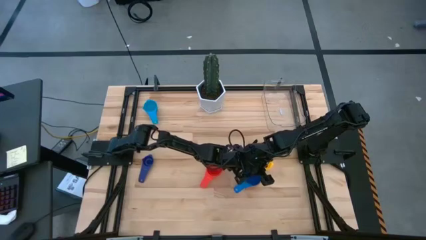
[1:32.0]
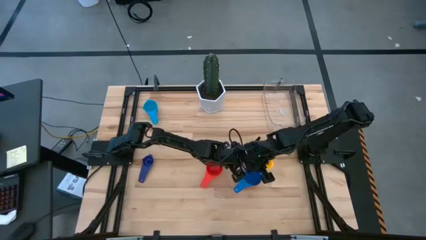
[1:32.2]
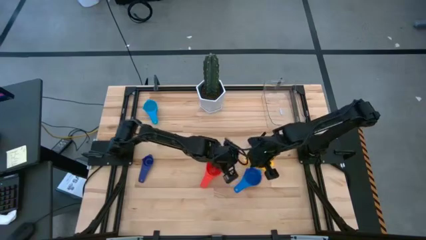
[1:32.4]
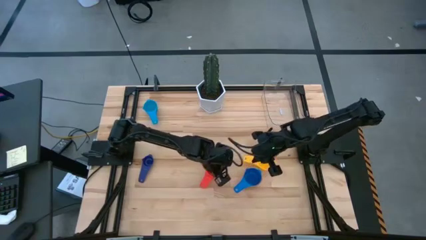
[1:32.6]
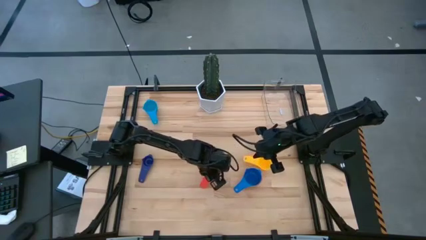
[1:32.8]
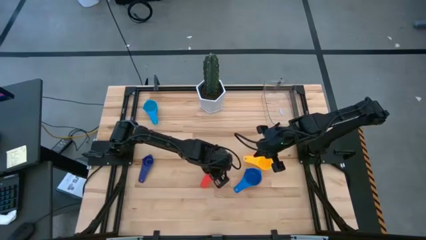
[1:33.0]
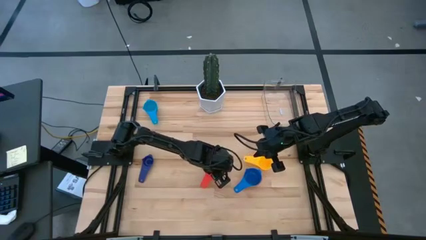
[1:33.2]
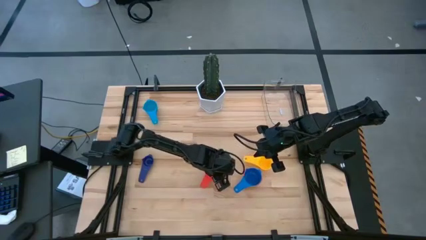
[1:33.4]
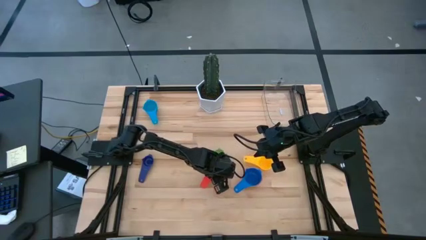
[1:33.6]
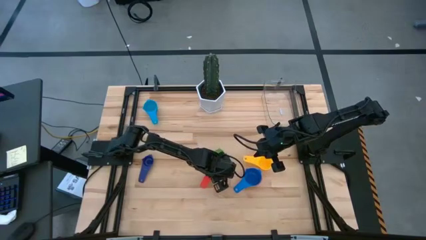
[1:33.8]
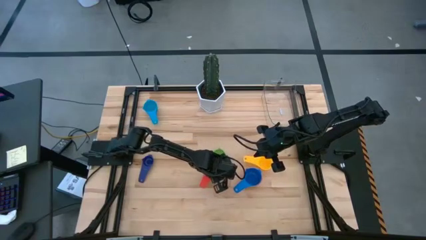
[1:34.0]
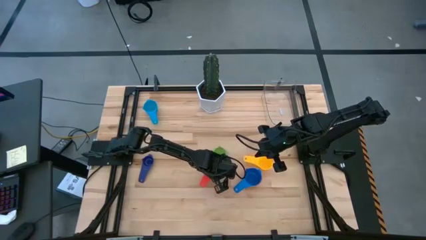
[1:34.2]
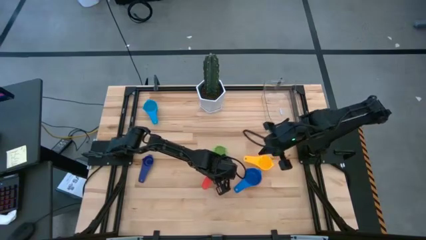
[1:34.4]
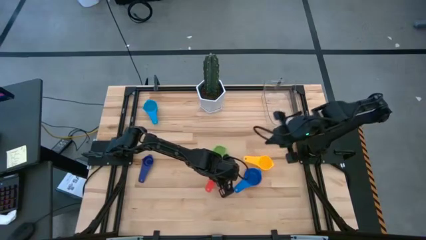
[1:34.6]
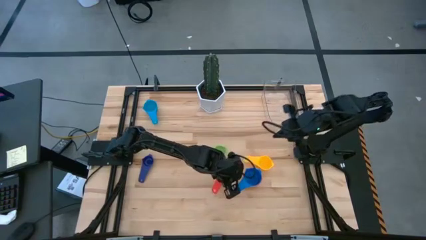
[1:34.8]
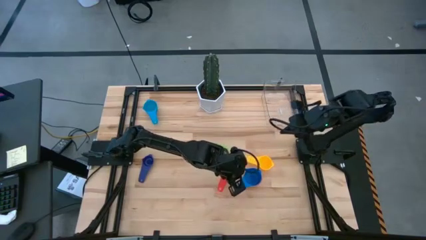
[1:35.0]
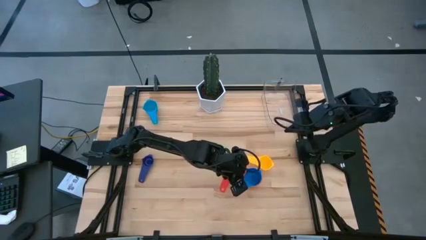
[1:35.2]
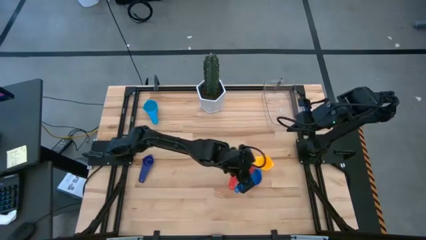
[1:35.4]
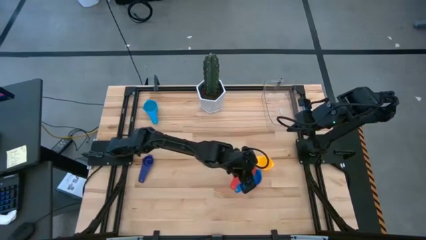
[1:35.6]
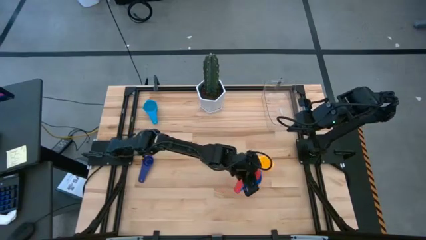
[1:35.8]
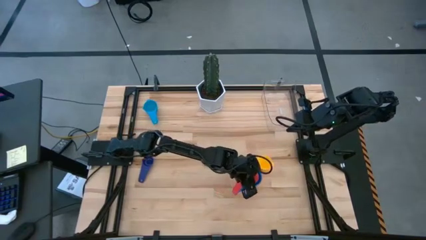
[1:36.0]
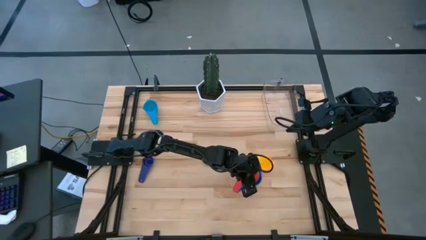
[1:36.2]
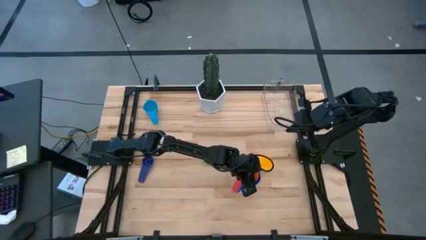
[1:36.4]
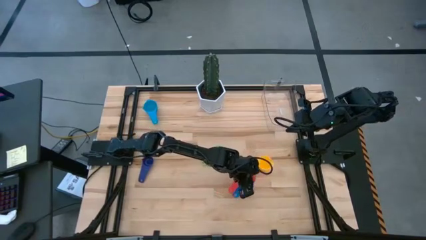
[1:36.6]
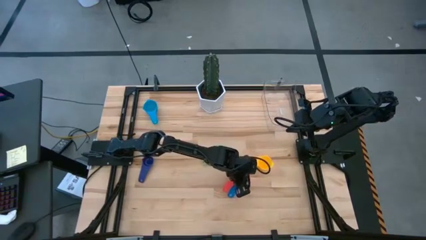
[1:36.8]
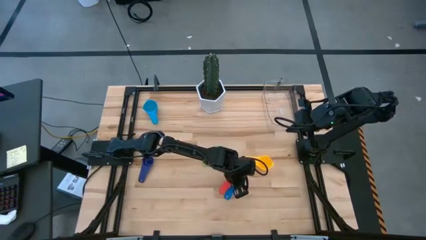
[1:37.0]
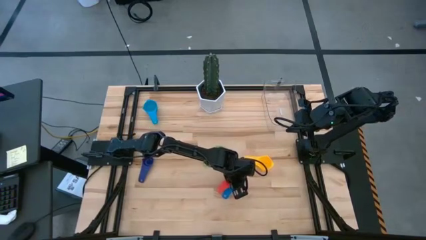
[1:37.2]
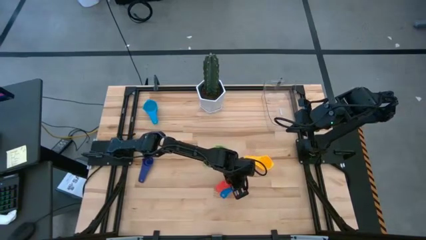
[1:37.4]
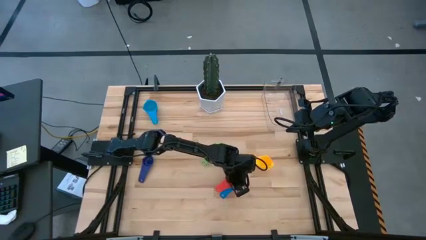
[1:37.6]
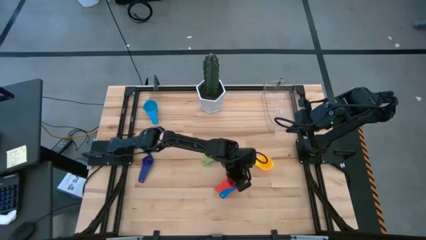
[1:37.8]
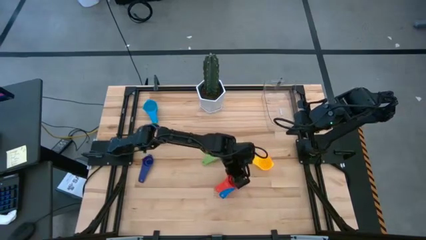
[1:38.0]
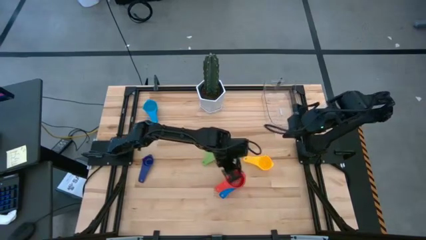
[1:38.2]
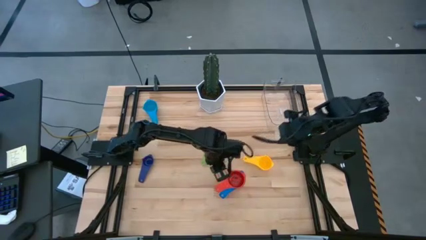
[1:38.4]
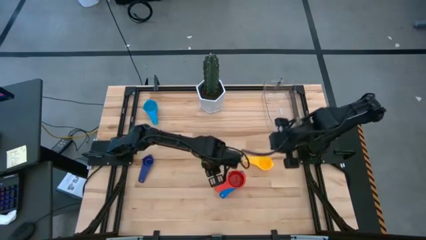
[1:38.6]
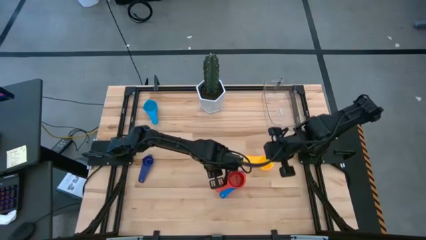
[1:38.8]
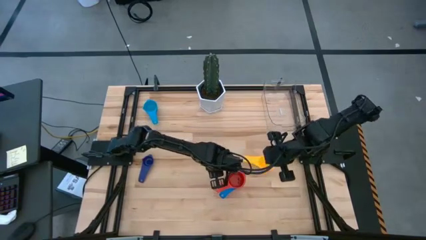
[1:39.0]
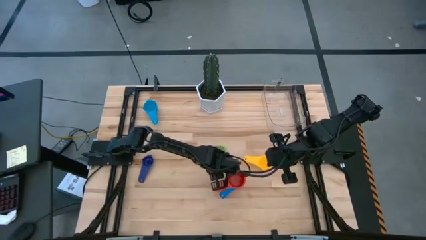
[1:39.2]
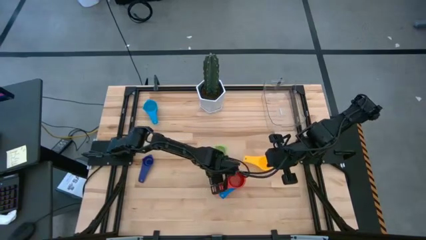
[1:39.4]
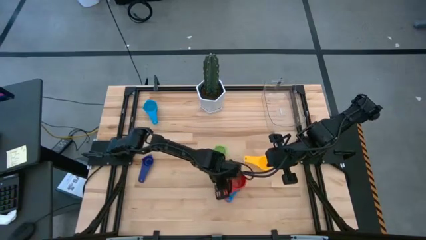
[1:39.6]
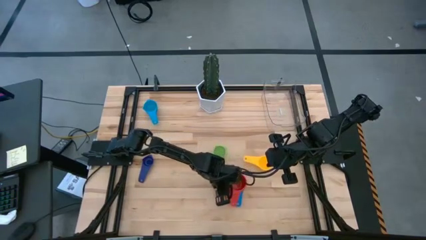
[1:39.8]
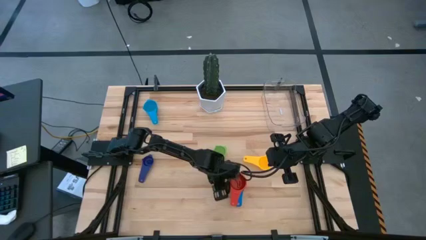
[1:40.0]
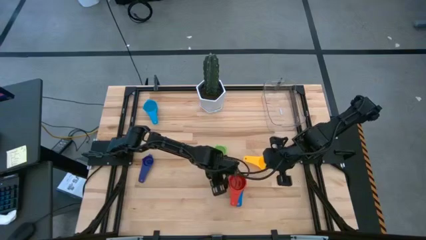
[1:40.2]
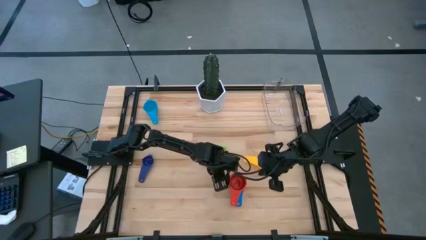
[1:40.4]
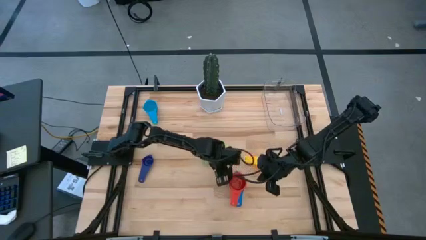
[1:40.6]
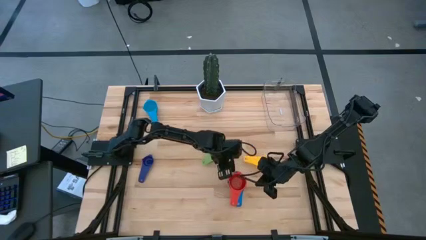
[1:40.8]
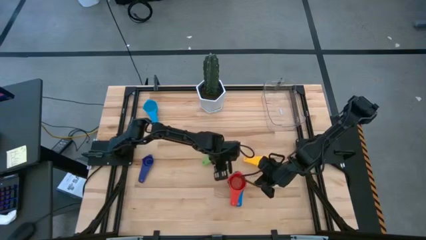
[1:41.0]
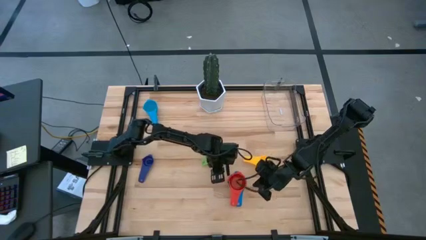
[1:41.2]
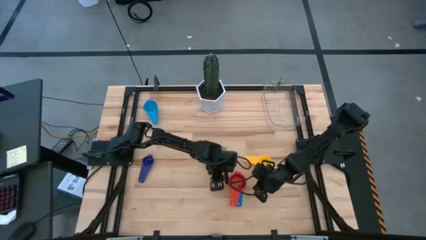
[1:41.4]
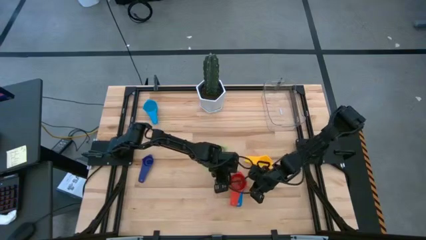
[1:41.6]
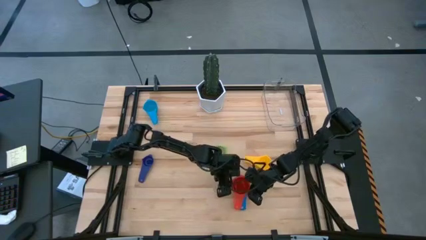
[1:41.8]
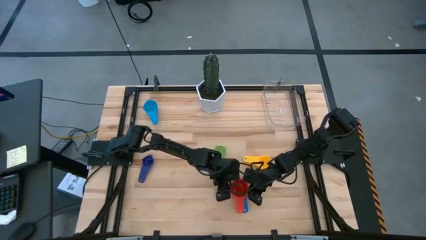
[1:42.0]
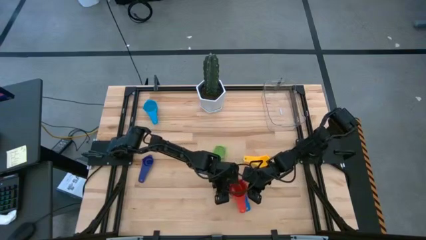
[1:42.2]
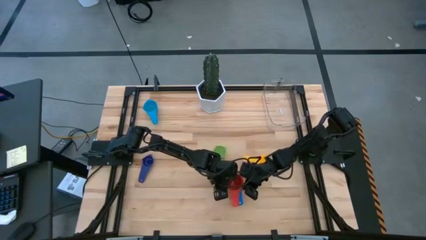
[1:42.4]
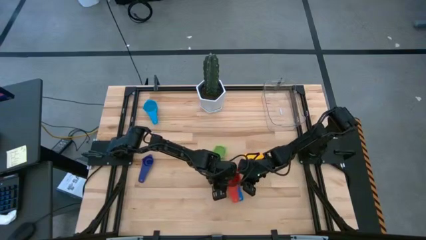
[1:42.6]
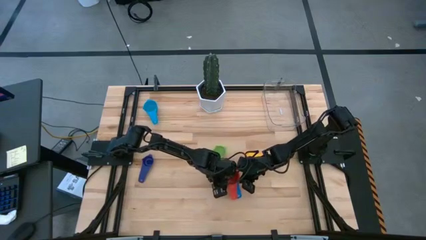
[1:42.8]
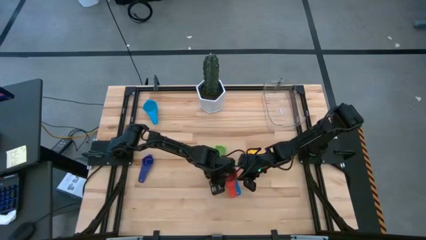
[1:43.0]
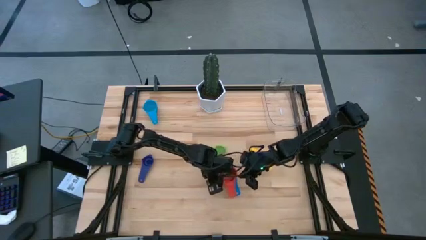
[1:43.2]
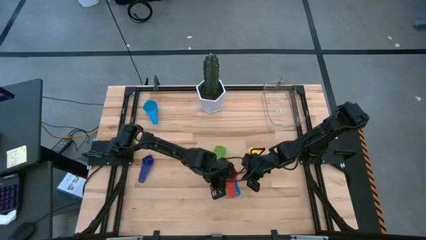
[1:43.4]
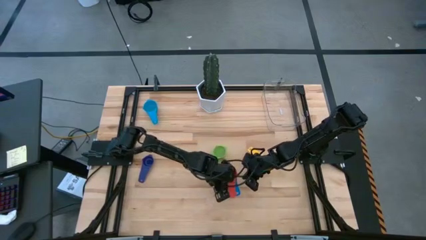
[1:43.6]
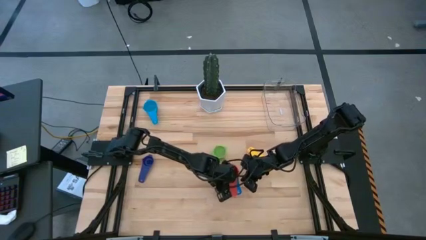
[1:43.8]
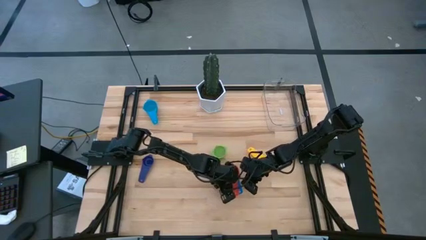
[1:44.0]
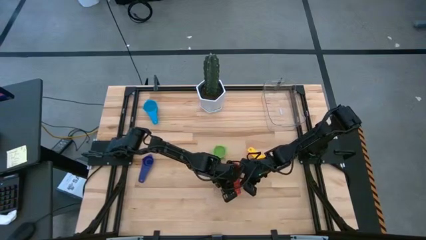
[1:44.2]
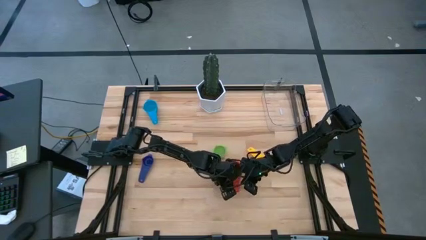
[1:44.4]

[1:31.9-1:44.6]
Task: Nest measuring cups in basket
Stack the red measuring cup on top of the blue measuring cups

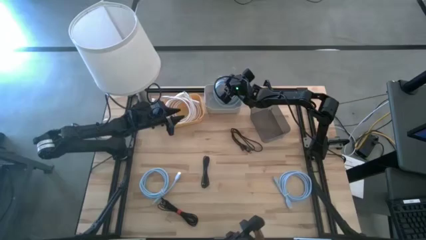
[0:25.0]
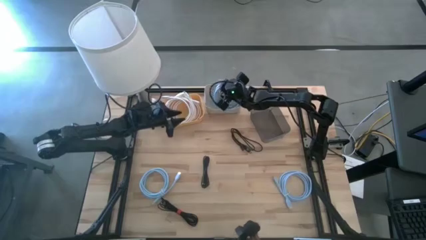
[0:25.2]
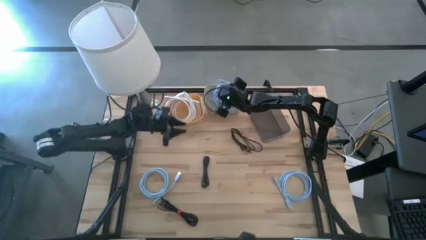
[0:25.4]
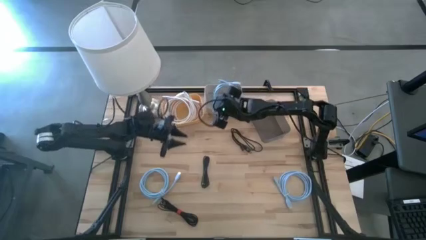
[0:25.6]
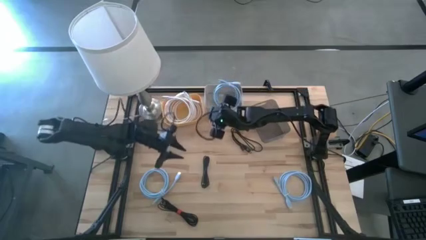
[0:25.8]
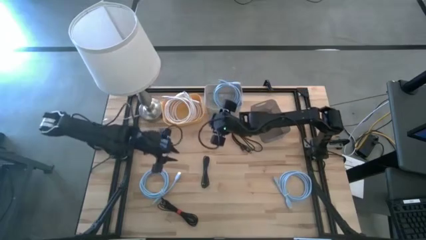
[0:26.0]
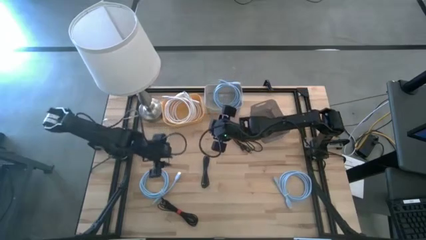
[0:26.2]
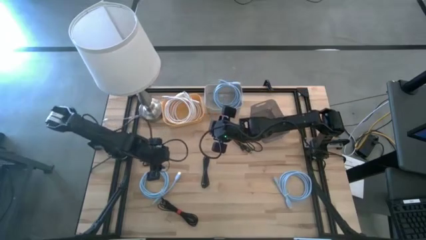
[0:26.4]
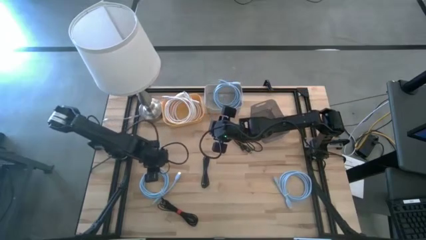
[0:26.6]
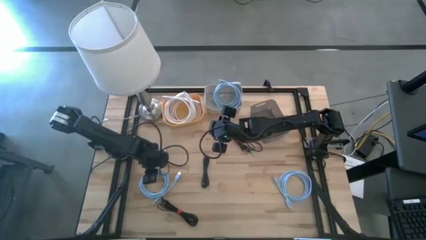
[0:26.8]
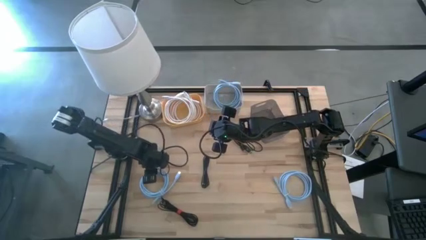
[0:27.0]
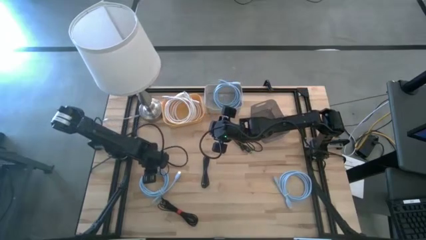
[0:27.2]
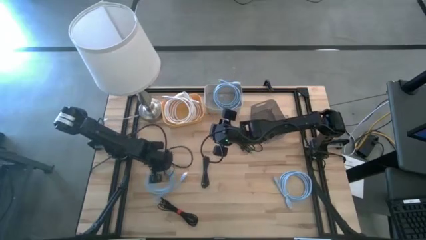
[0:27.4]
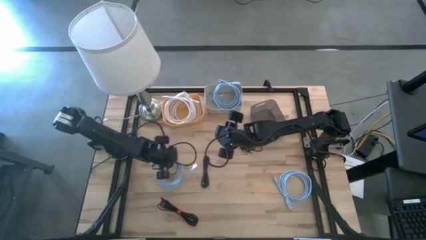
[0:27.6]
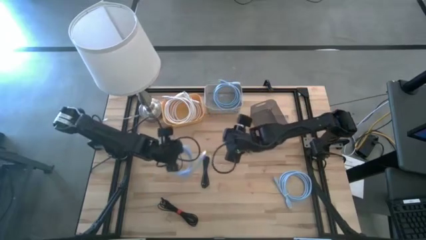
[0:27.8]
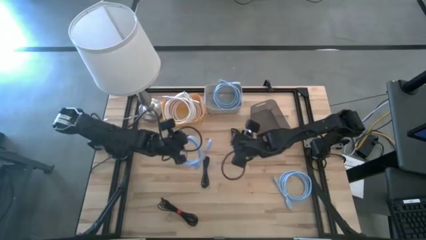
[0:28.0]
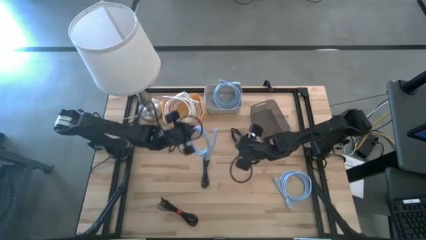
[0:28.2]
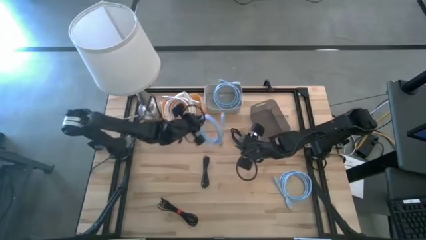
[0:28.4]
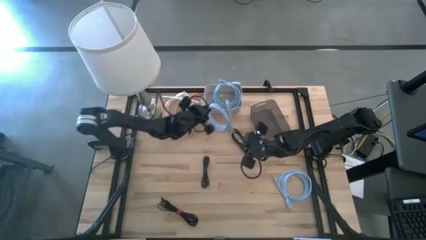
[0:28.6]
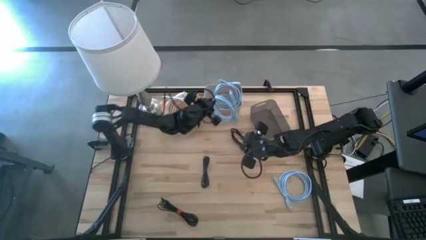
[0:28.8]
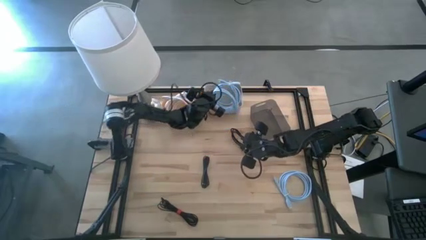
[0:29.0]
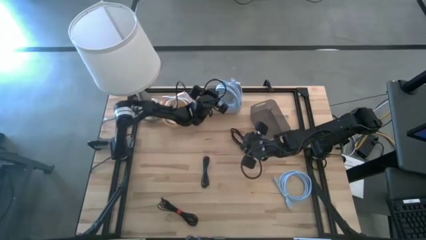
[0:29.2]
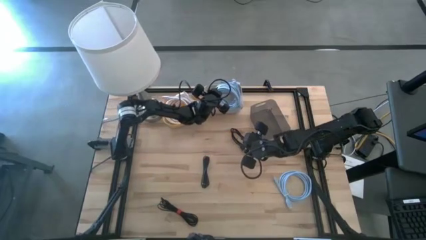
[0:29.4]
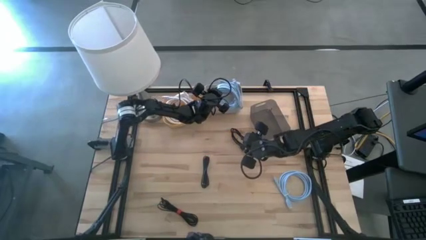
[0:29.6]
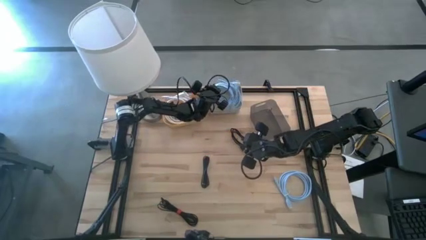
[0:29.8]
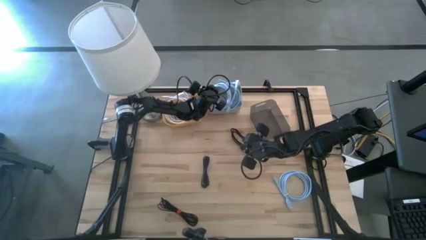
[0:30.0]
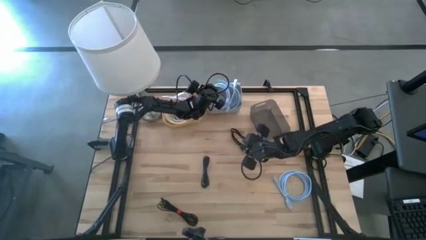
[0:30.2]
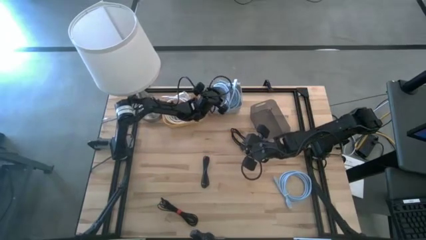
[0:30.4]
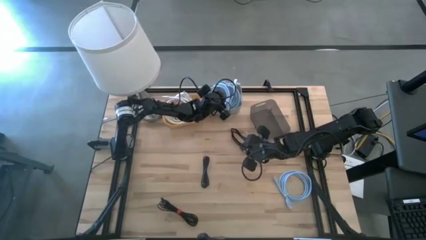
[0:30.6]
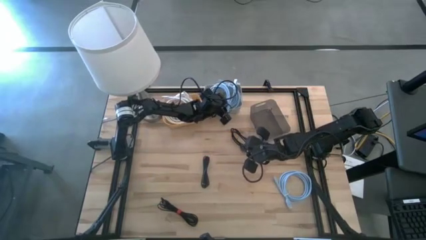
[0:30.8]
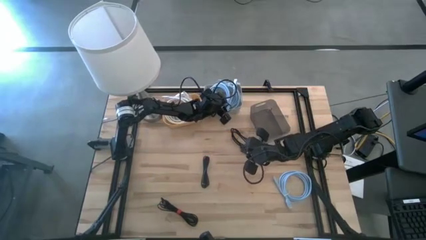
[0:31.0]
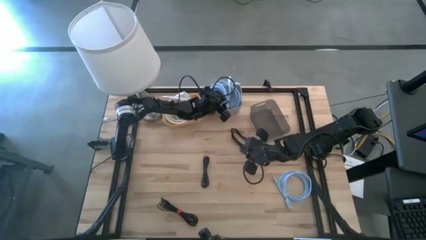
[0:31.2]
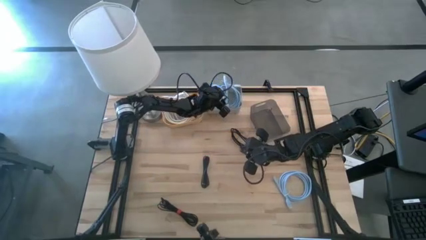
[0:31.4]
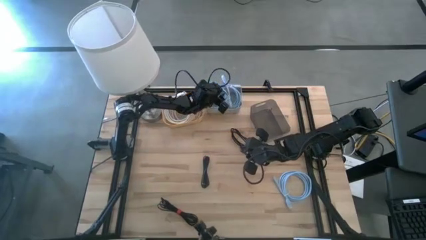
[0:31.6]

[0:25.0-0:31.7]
Task: Pick & Place USB Port
Put the left blue display cable into the gray bin
